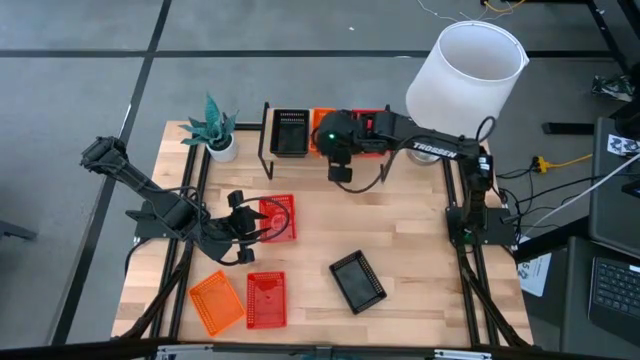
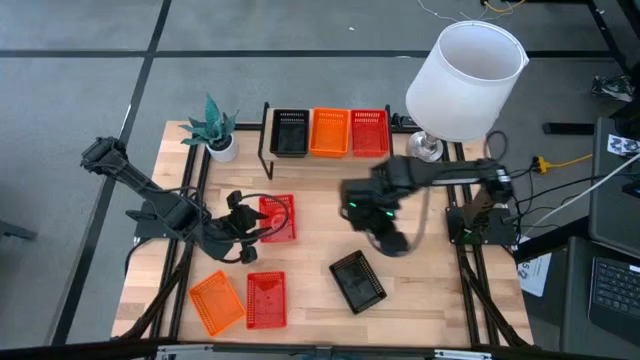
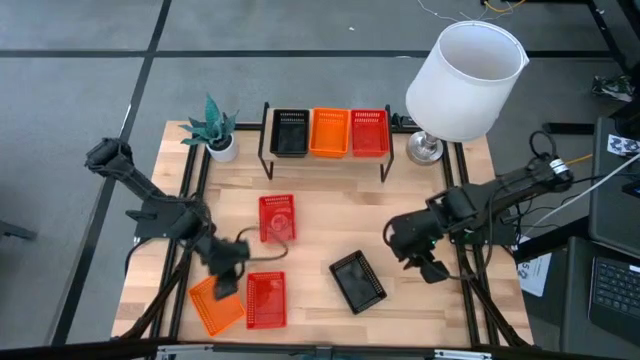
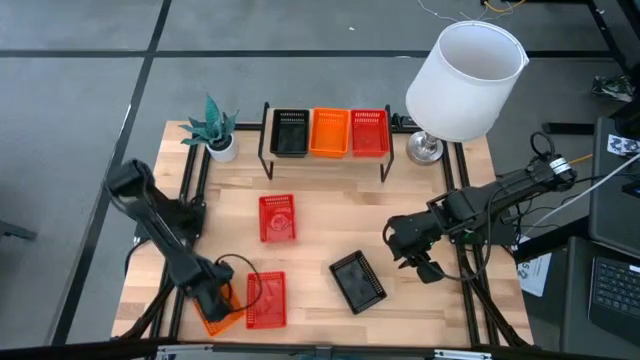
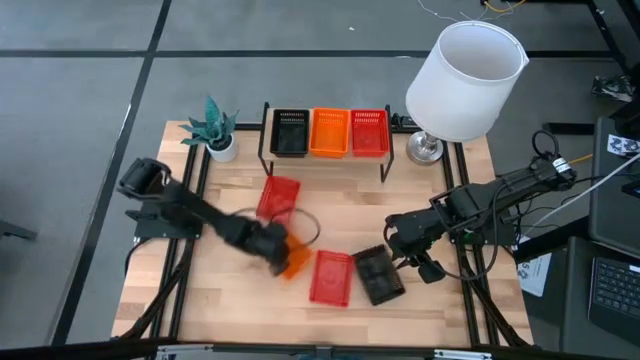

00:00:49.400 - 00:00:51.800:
Task: Stack baskets on shelf by color
Move the orange bin to the center of the table

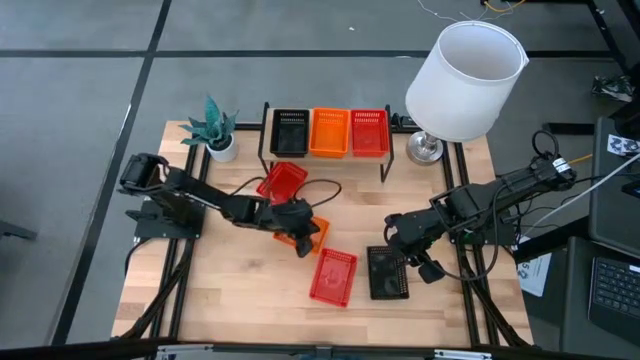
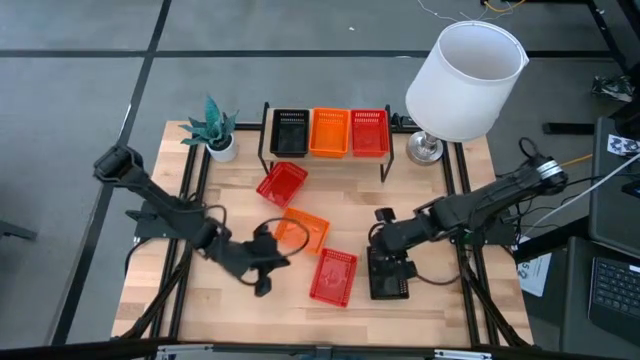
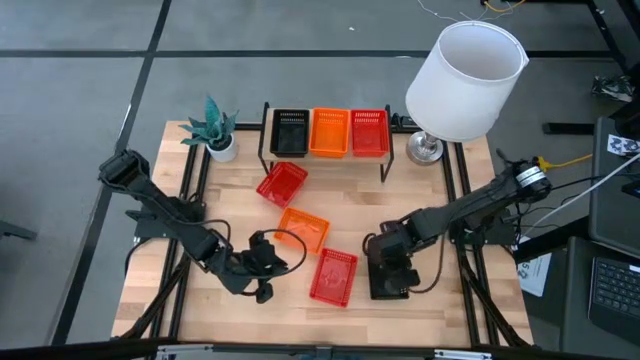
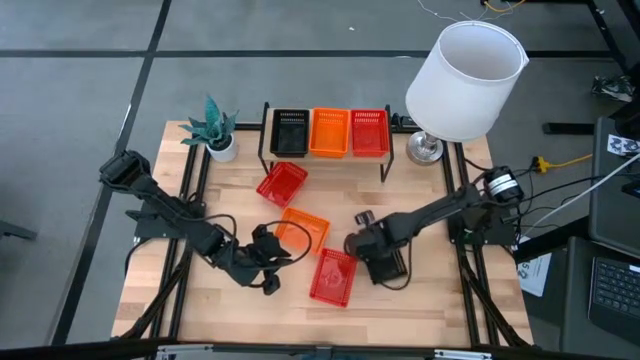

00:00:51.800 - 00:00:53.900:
Move the black bin to the center of the table

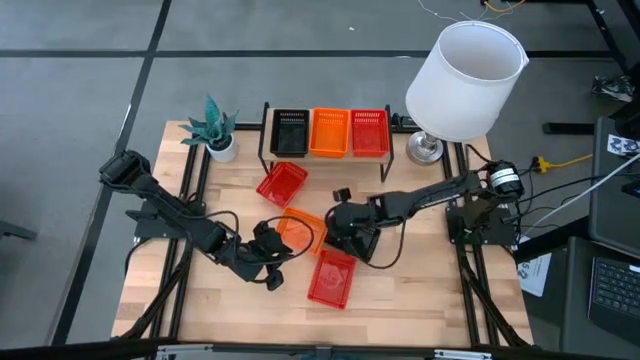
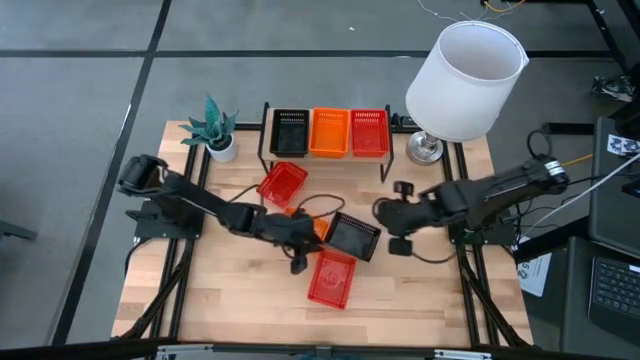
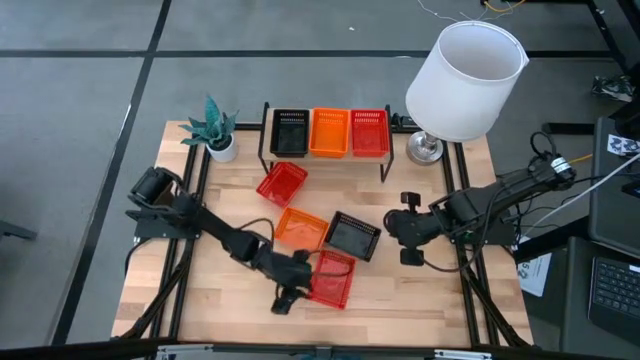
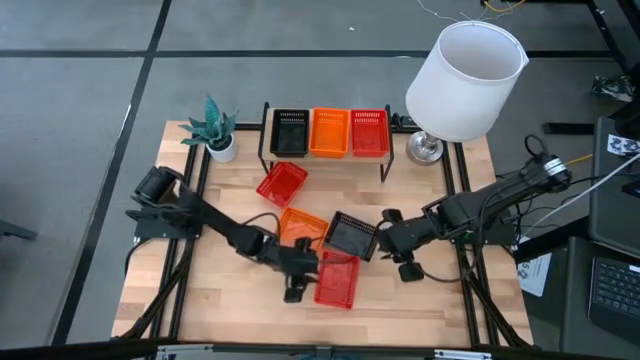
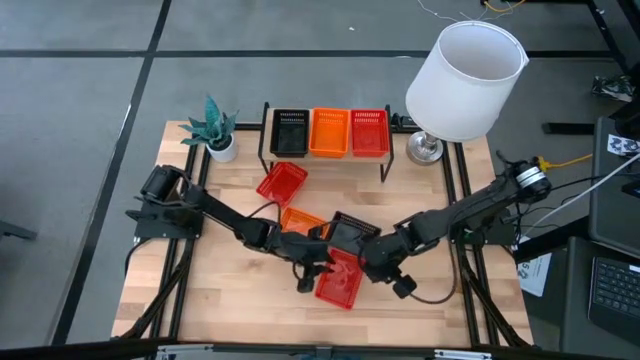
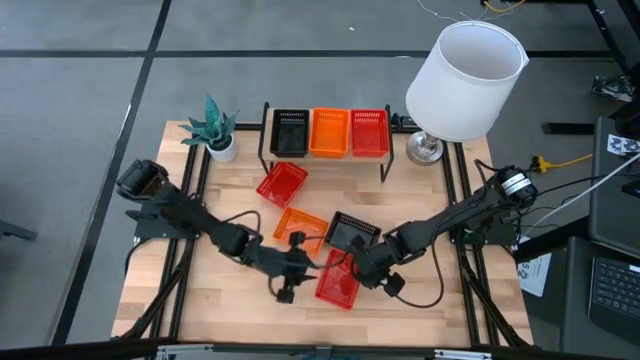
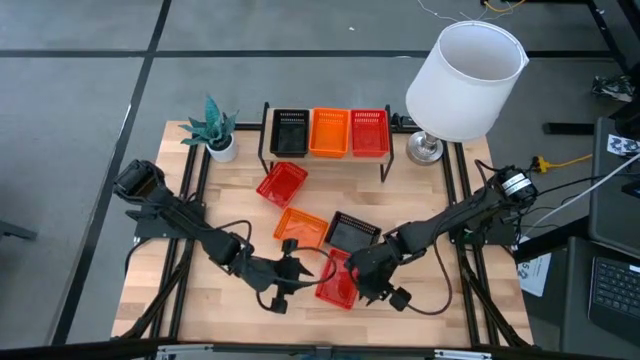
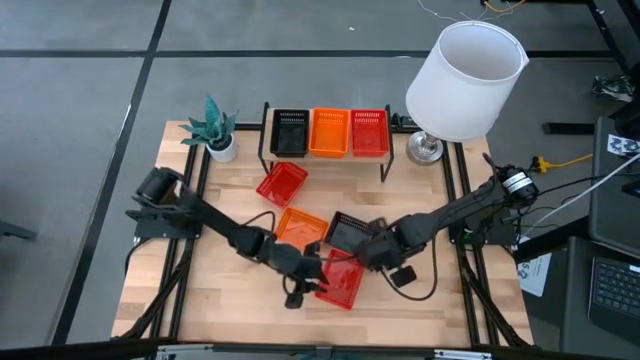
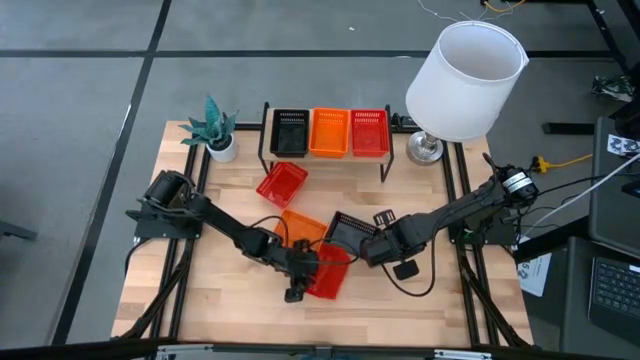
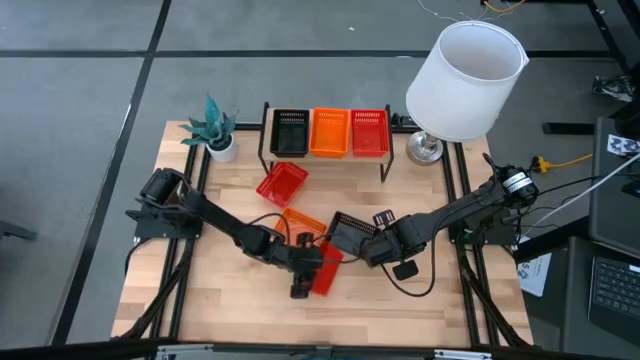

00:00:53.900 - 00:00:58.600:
Stack the bottom red bin on top of the red bin on the shelf

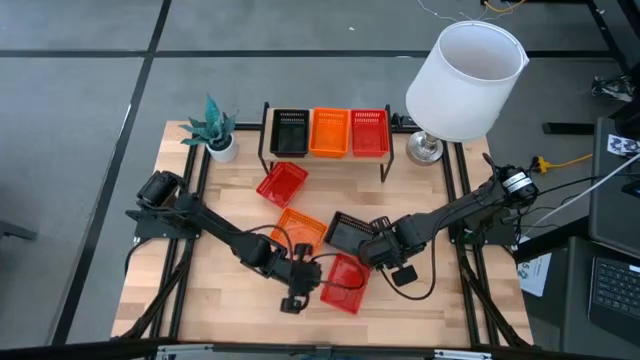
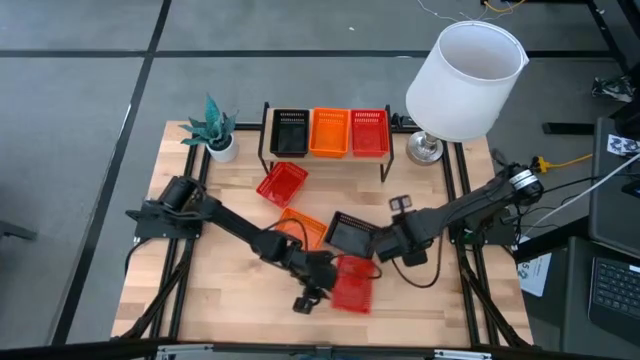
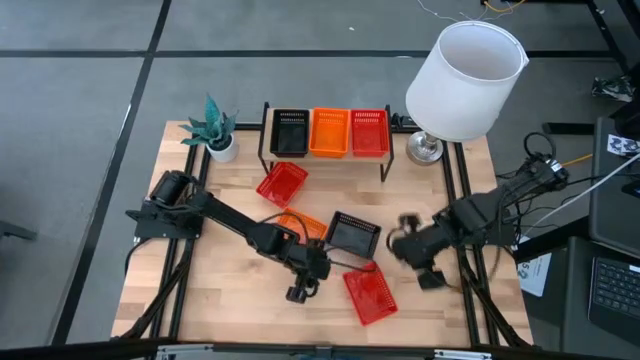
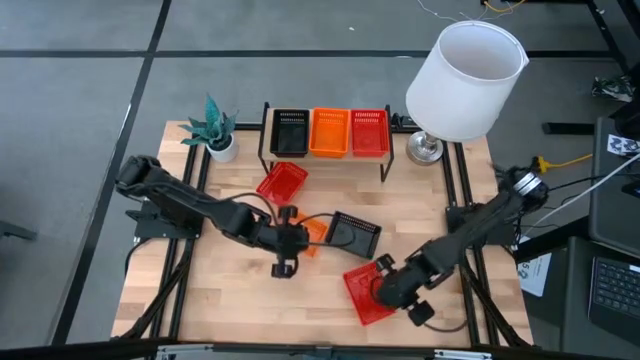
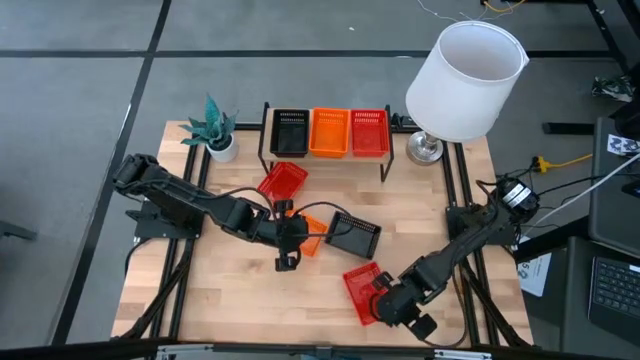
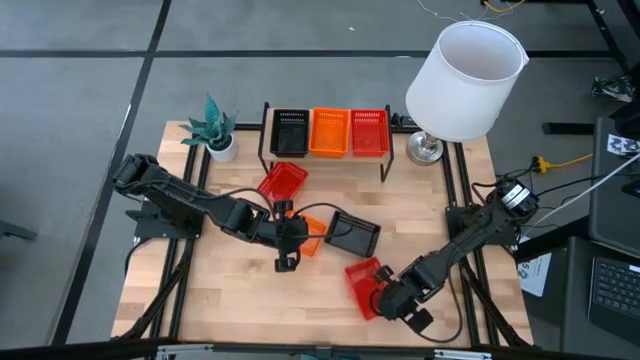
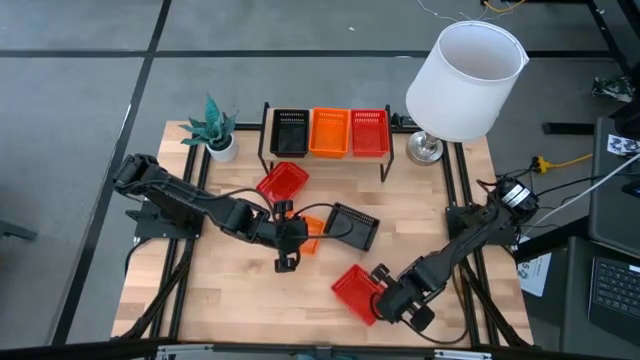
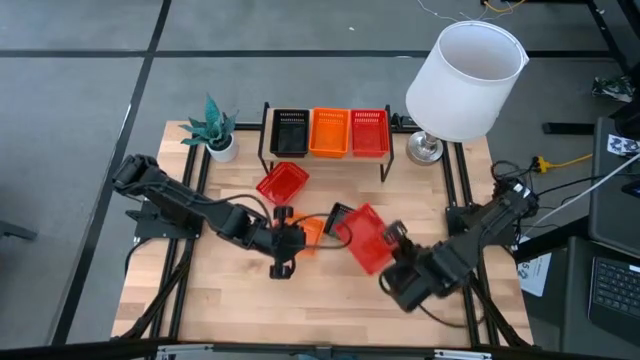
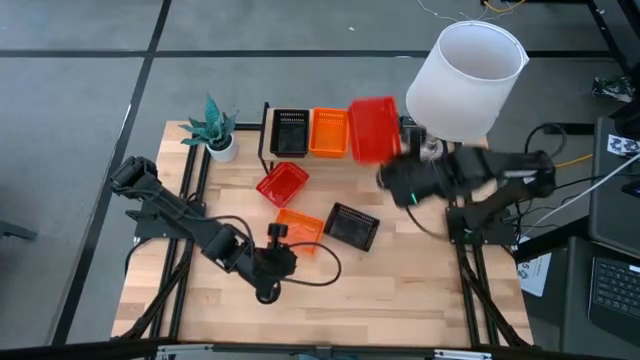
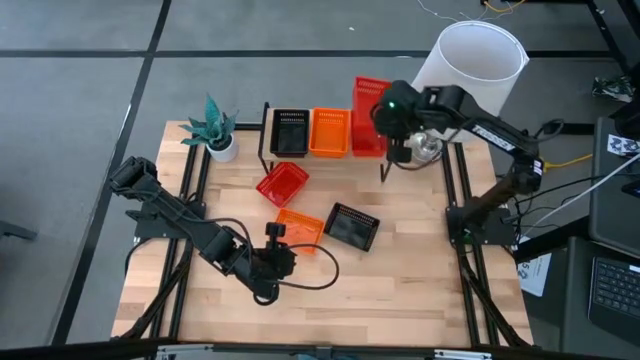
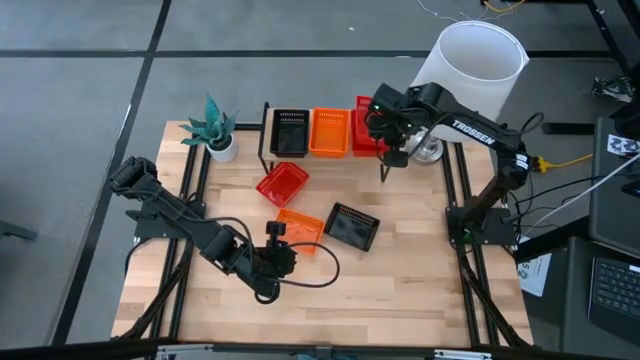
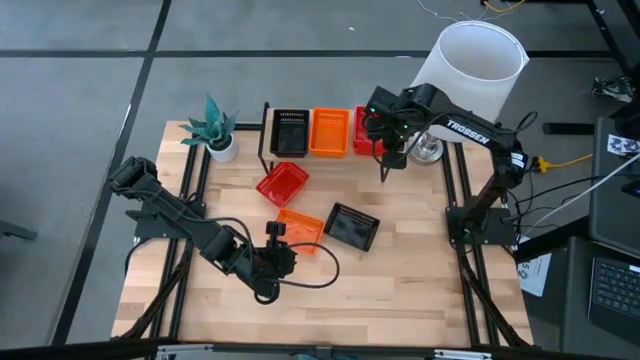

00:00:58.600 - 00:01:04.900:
Stack the bottom red bin on top of the red bin on the shelf

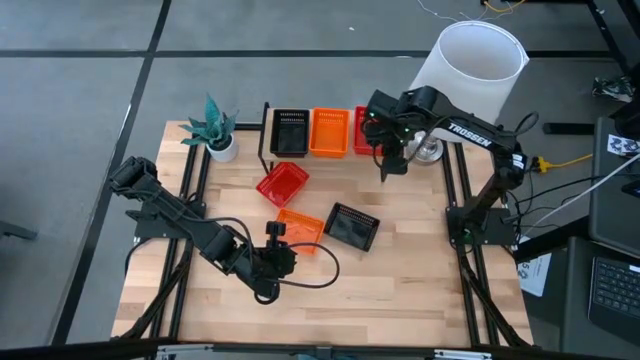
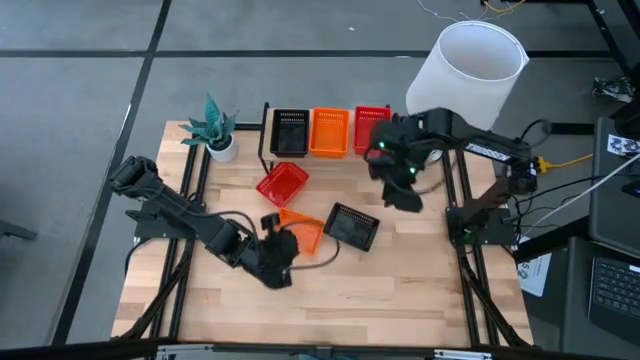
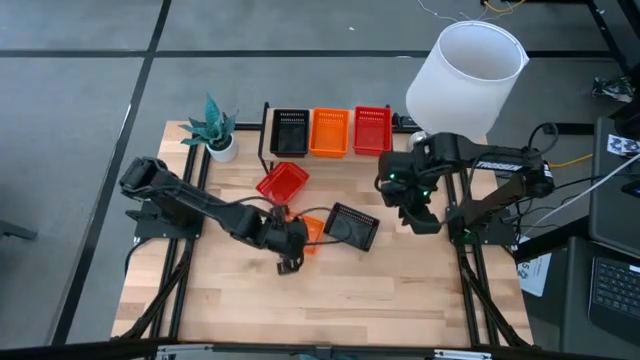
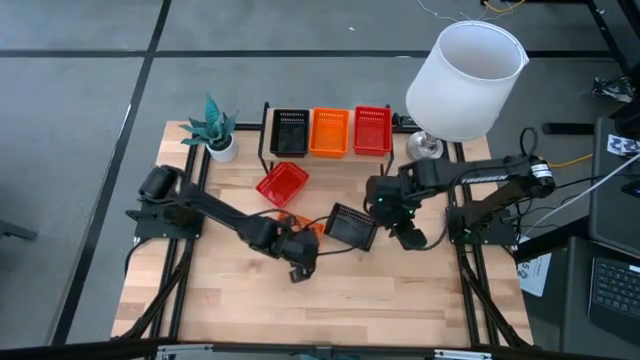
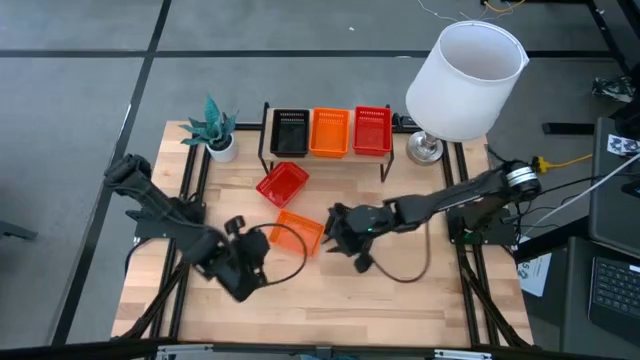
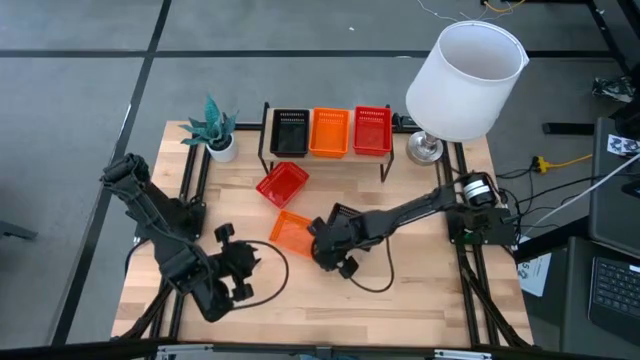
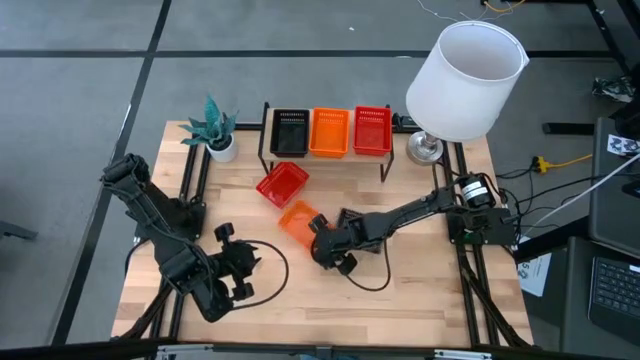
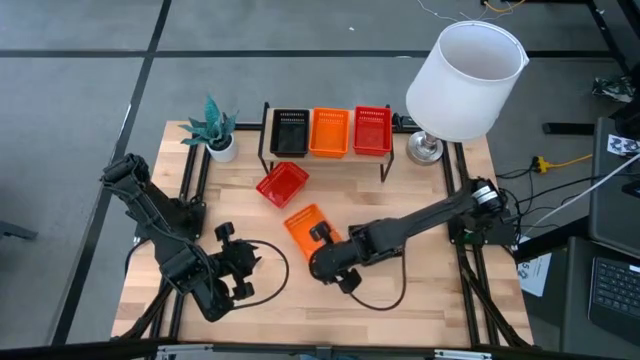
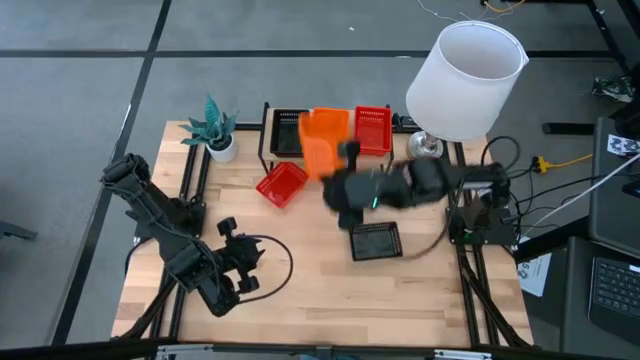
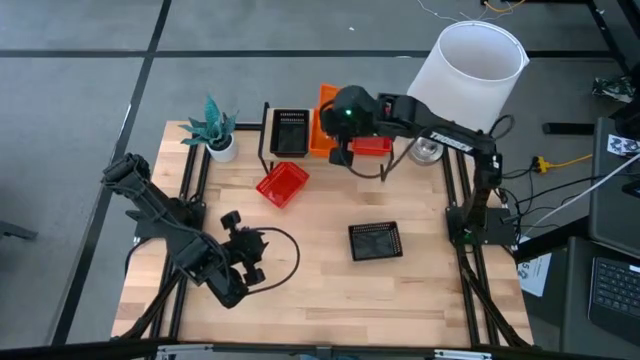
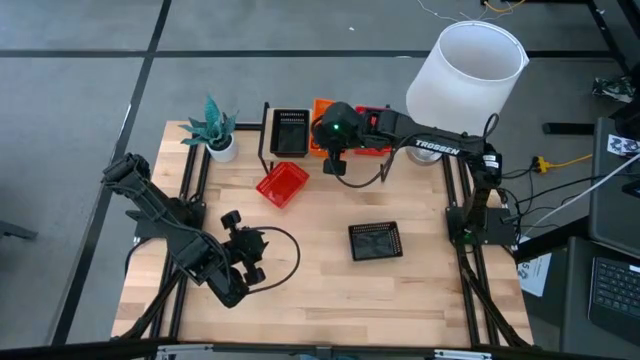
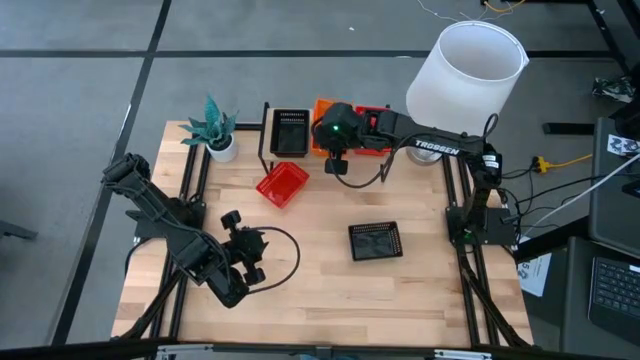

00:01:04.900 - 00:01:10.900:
Stack the orange bin on top of the orange bin on the shelf
